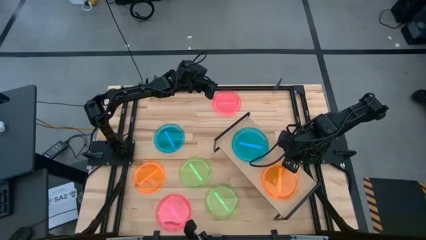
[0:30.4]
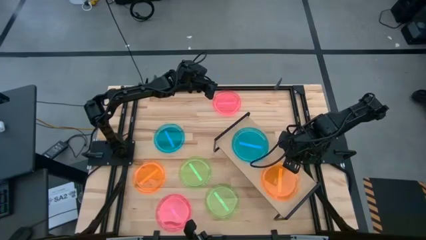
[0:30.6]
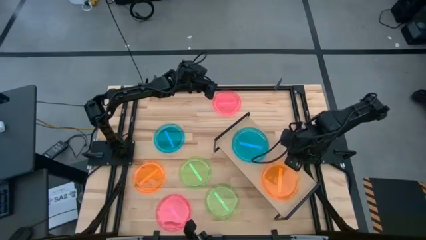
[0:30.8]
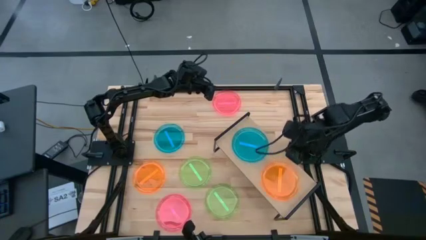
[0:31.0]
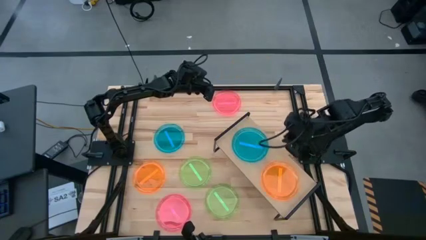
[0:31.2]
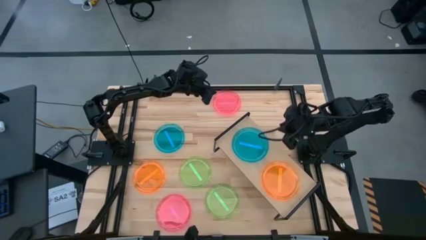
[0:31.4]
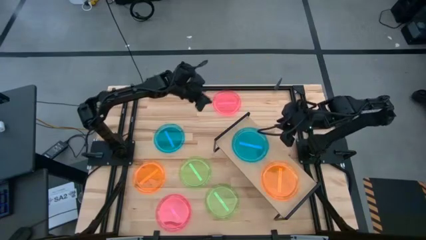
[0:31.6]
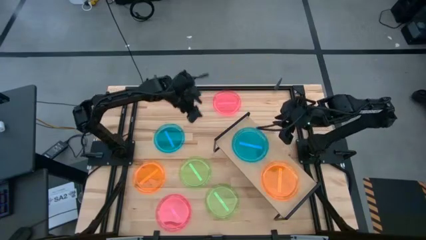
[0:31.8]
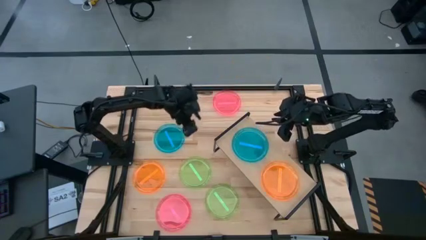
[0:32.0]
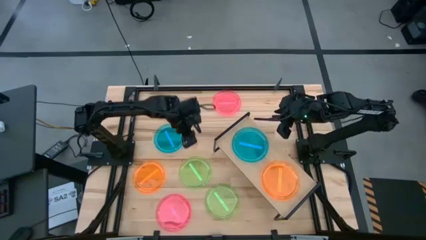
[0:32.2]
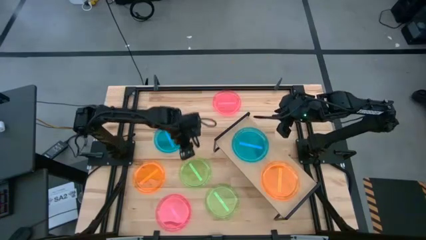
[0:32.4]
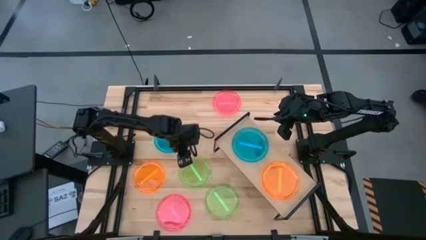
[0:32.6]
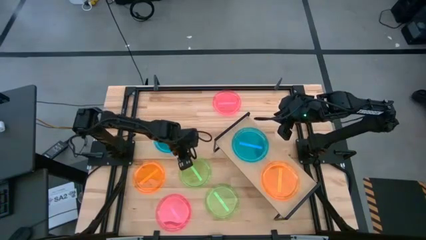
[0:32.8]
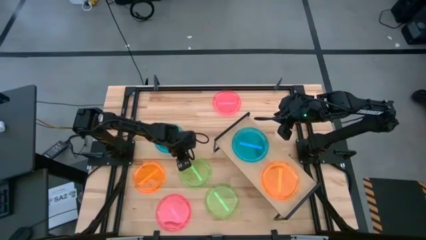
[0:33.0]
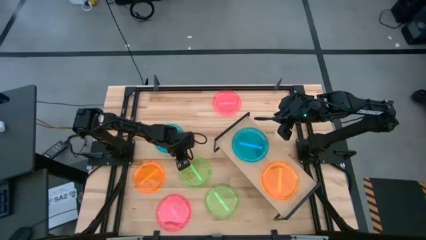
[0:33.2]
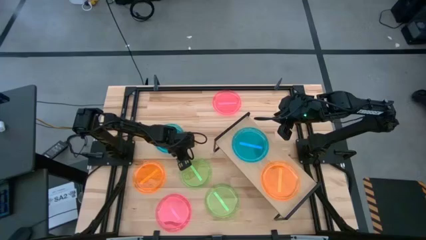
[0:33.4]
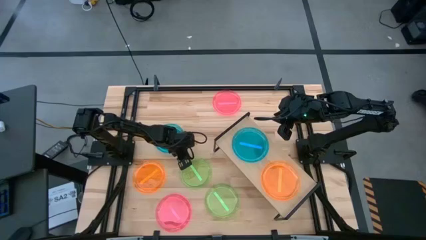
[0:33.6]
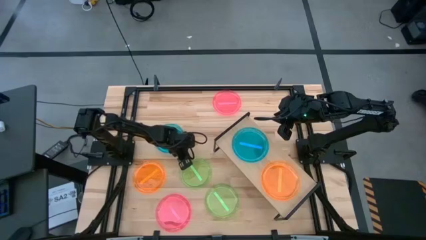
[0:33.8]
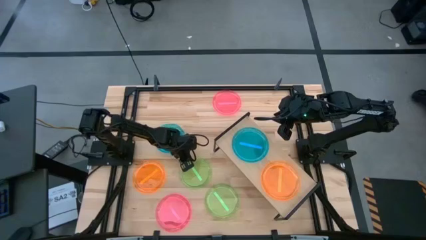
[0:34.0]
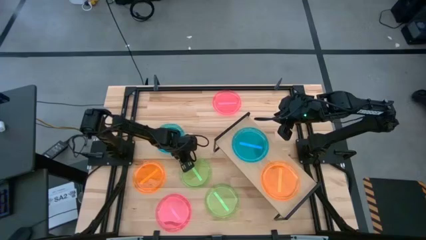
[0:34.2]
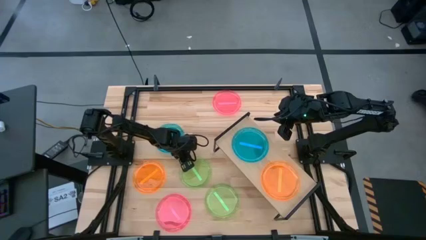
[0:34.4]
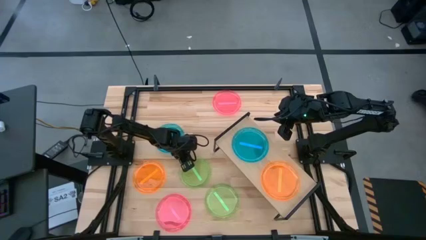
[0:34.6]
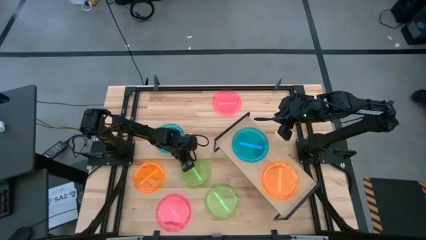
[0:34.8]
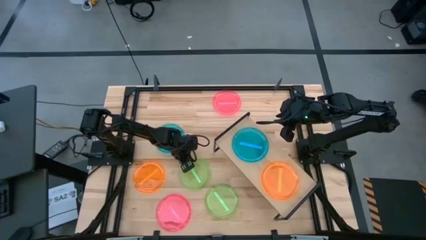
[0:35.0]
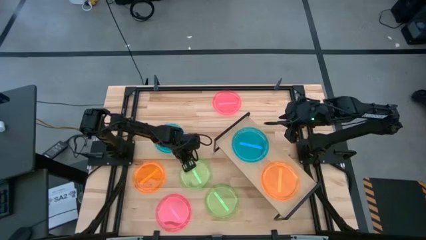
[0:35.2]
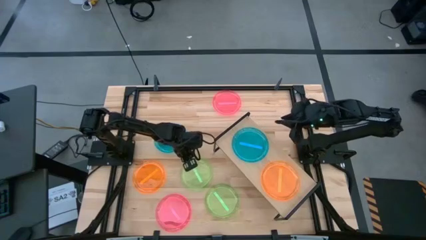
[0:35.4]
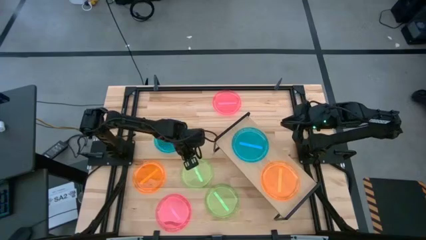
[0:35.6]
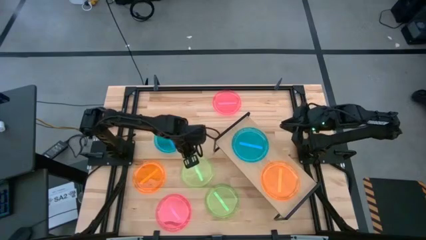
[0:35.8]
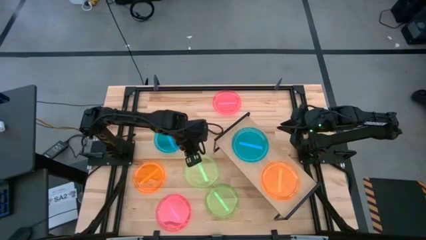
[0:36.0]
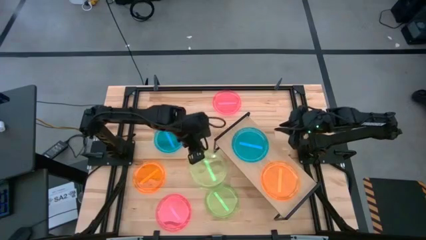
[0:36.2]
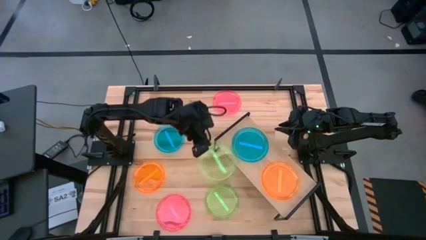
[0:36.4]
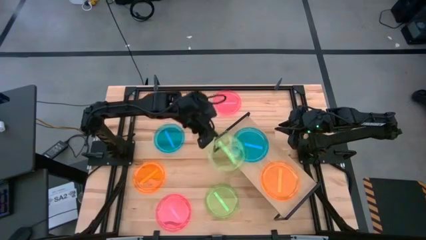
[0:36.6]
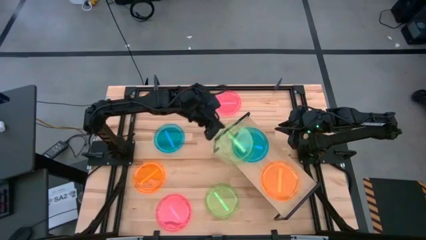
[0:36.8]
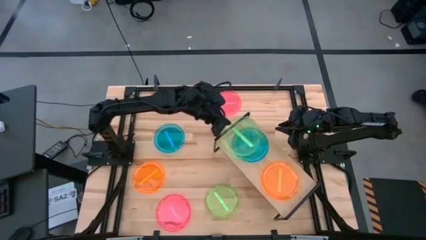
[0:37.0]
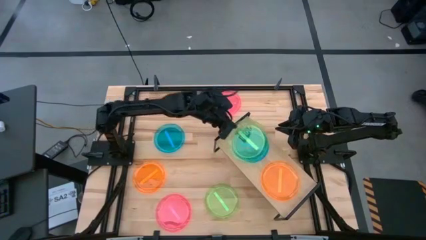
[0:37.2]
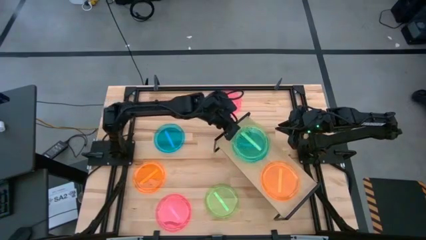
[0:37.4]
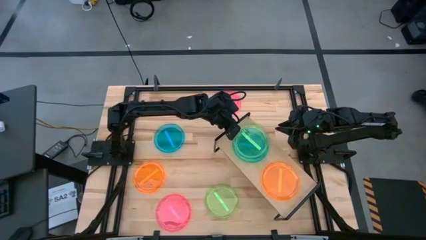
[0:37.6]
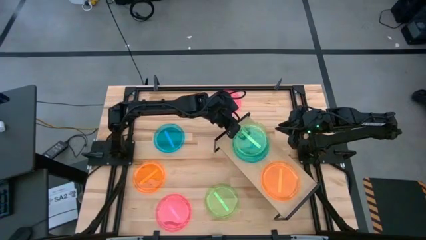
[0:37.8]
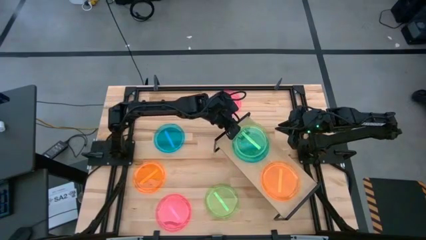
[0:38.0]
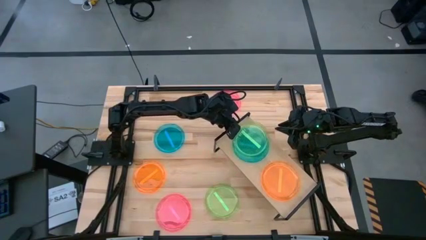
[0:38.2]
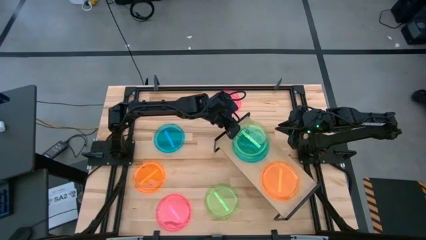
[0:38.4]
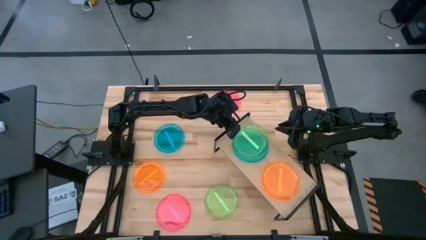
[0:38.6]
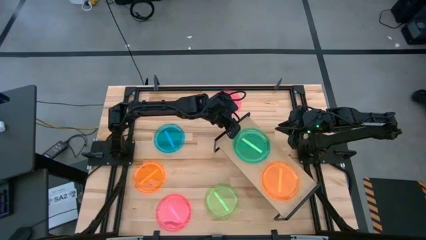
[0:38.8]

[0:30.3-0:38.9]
Task: Place and stack plates onto a shelf
Stack the top green plate on top of the blue plate on the shelf

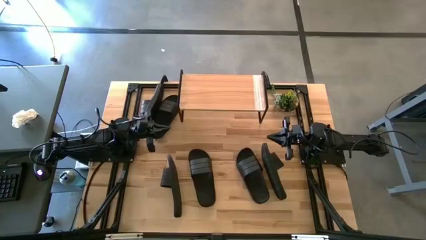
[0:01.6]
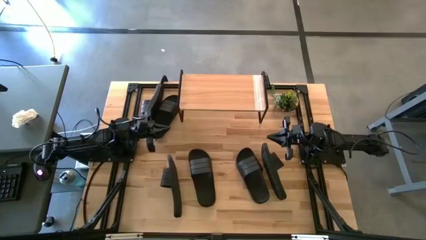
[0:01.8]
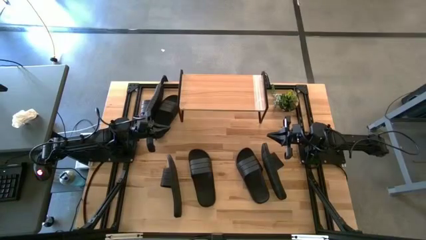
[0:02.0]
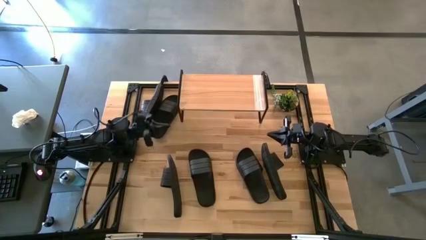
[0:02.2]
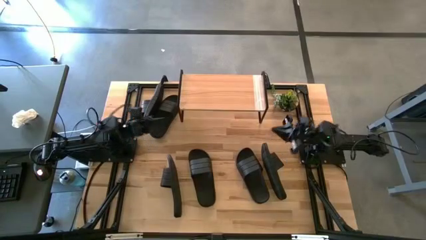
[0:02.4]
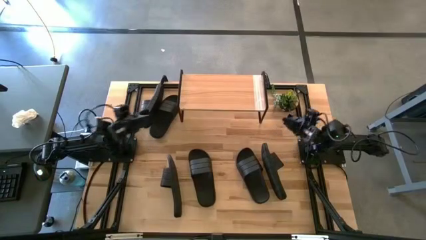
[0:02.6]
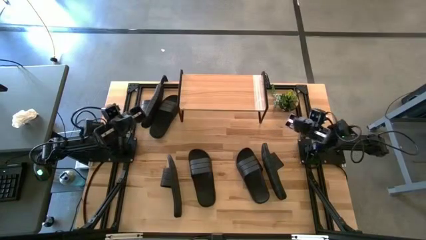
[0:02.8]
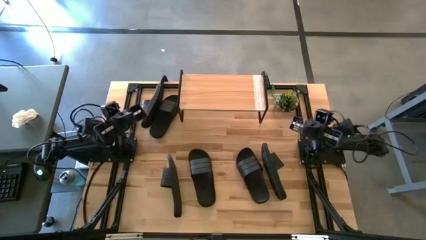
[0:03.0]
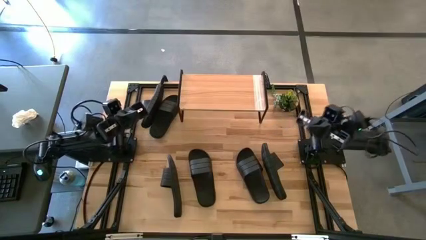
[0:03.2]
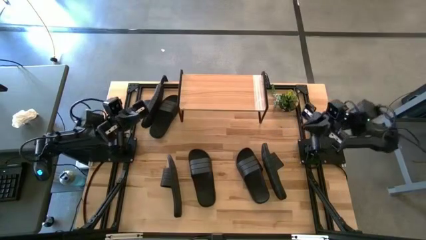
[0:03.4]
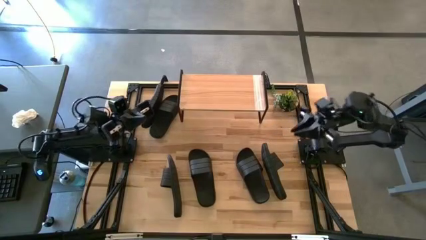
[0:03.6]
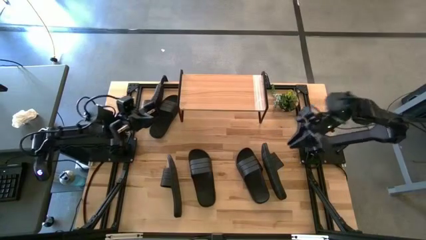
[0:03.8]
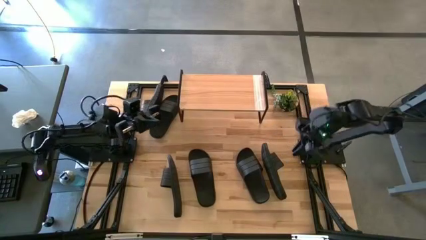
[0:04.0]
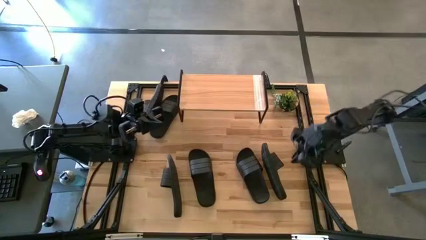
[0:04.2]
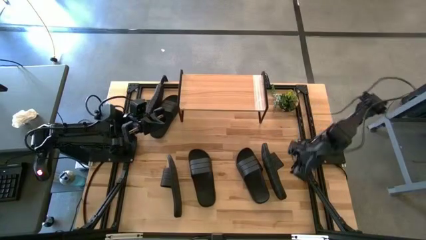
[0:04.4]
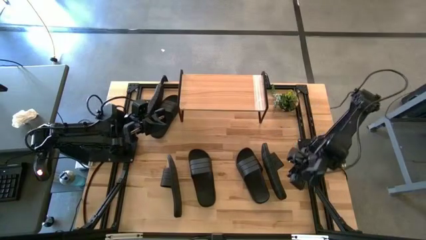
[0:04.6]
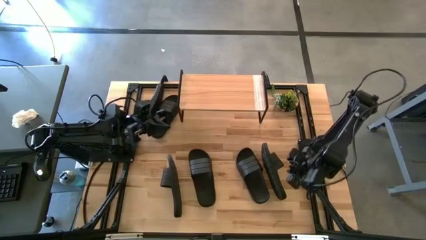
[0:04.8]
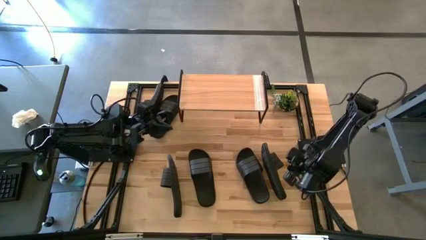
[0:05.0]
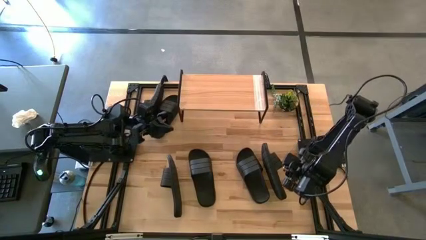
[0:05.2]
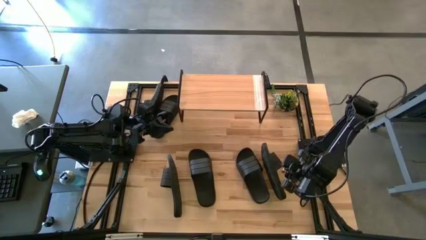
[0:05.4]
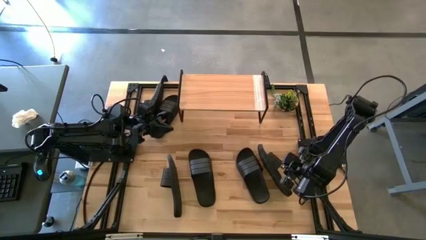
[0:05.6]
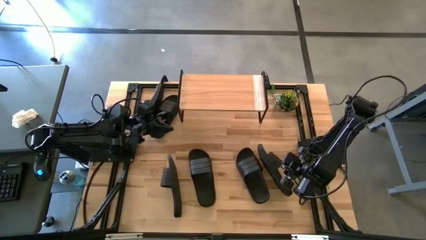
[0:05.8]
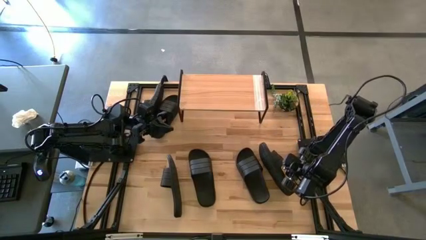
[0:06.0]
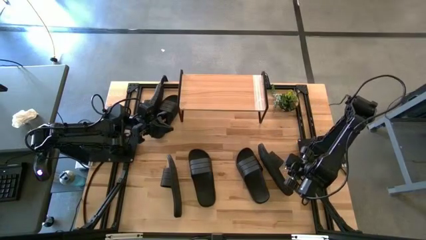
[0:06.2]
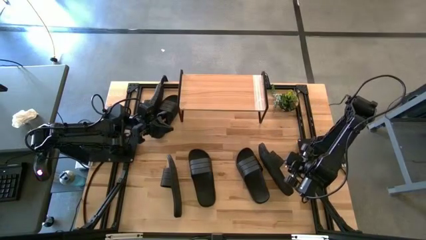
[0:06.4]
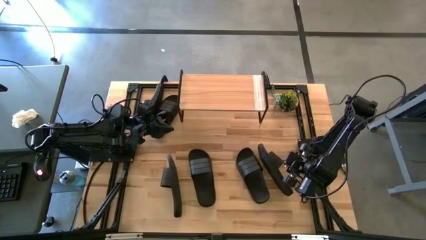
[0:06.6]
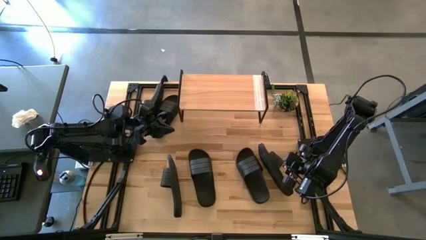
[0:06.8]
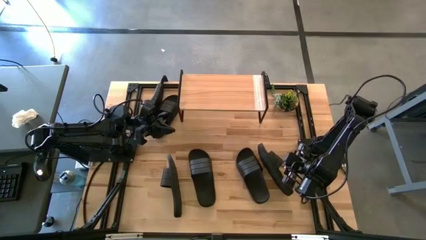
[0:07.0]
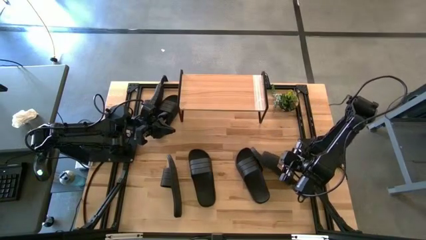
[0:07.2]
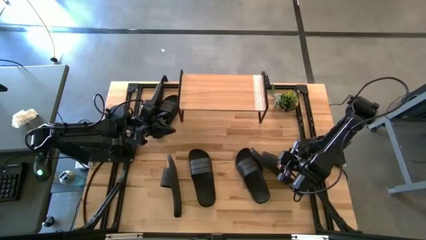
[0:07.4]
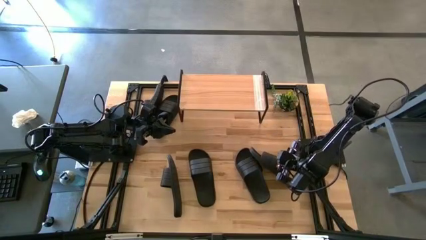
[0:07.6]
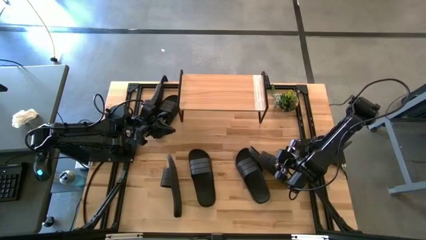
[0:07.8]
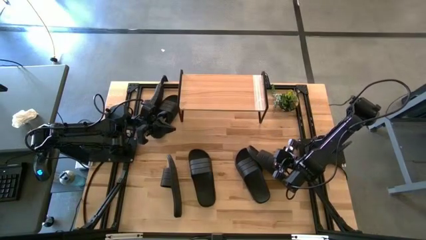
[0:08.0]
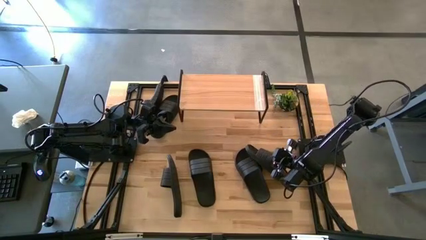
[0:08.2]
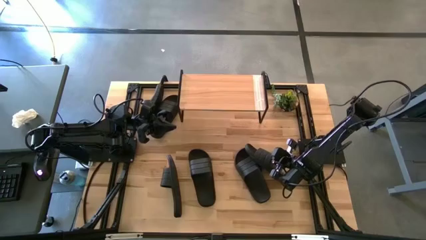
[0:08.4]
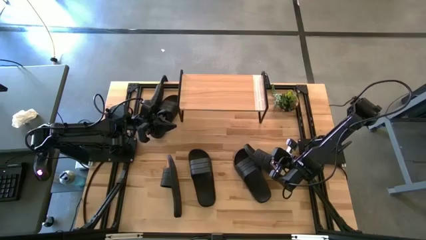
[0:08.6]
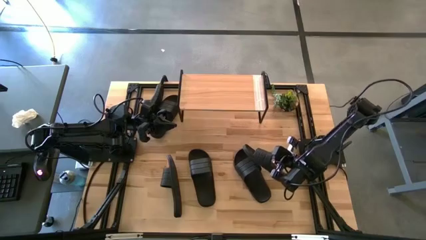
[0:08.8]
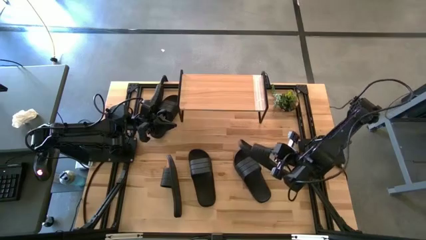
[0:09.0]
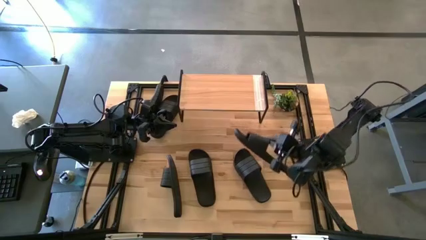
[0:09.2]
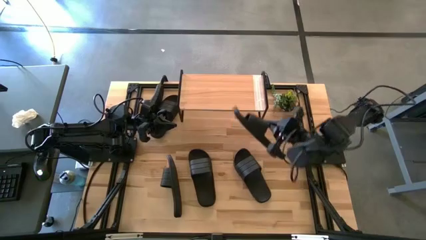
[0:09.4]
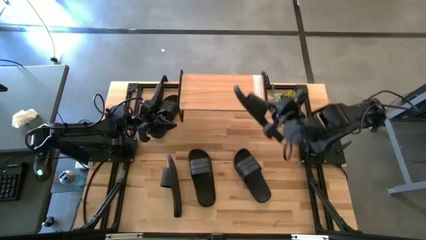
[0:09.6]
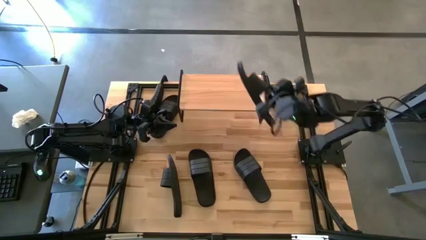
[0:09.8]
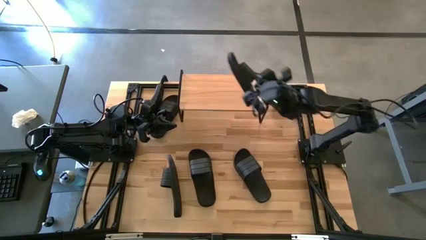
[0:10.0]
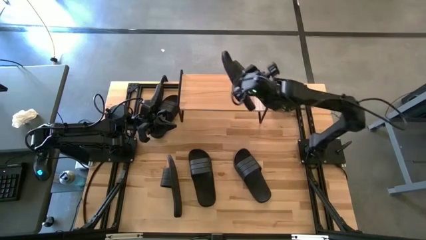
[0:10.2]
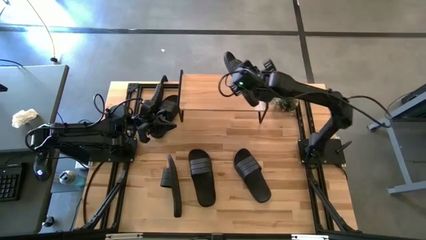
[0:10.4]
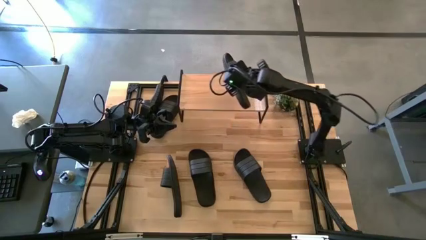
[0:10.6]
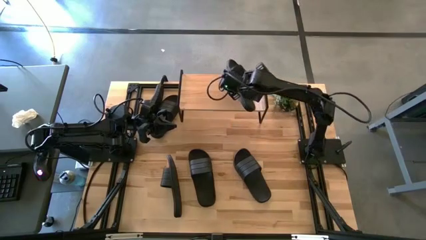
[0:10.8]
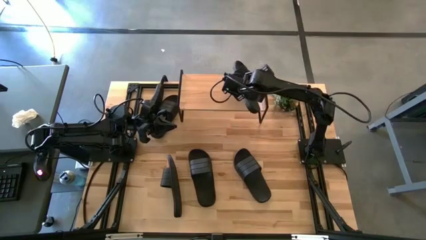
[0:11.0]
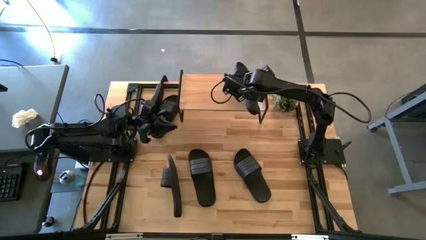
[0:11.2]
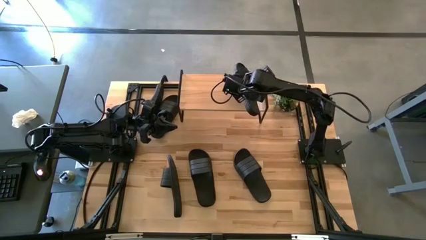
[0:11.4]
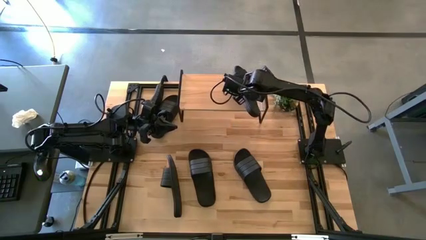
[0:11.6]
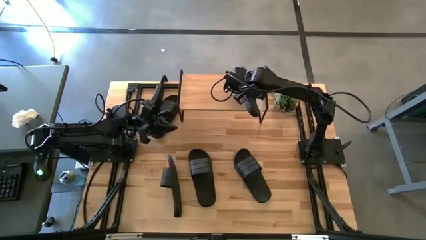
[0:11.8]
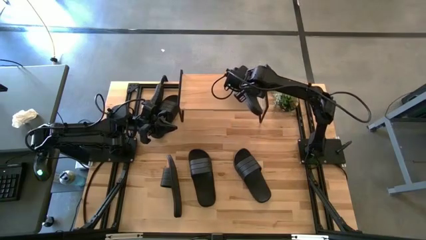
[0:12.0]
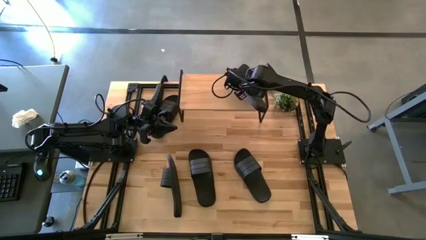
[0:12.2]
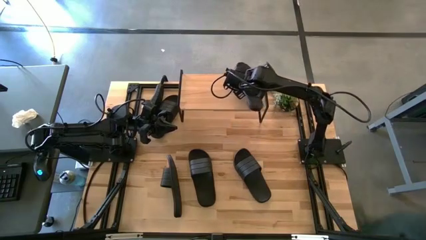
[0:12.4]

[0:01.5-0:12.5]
Task: Pick and place slides into the shelf
Put the black slipper on the shelf
